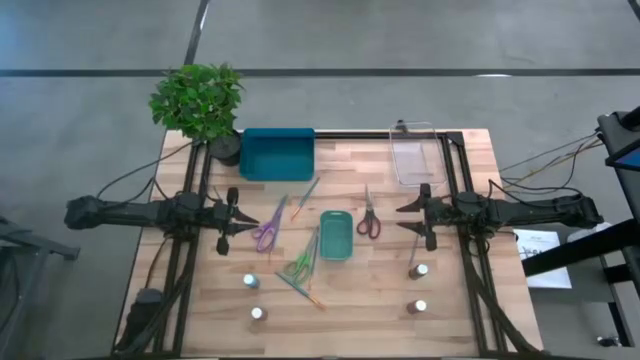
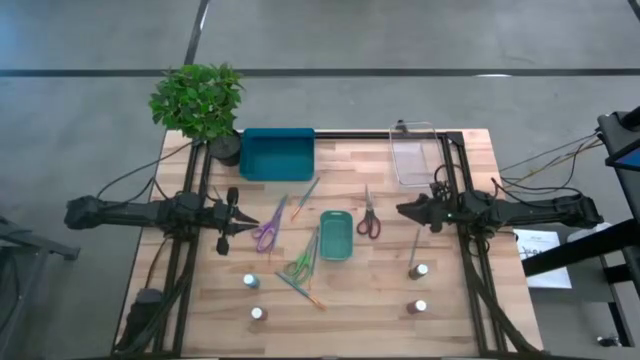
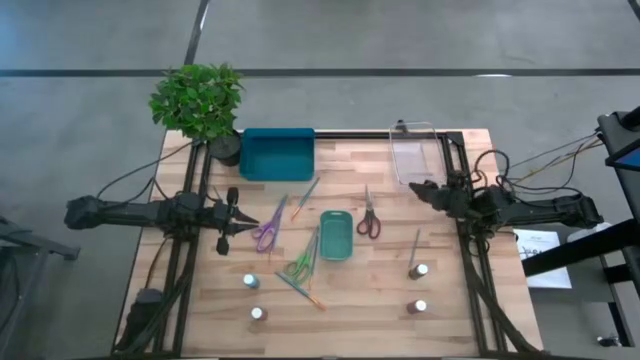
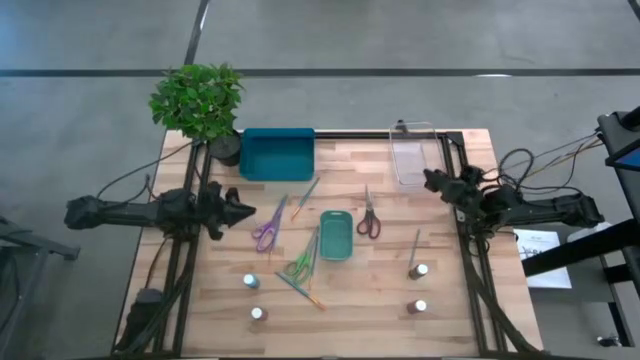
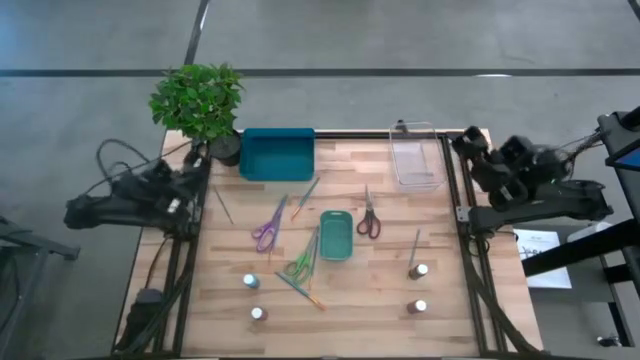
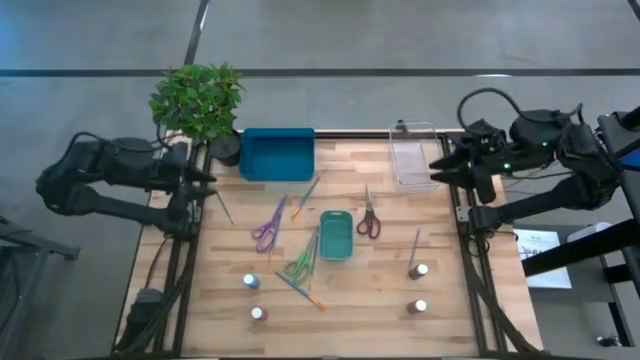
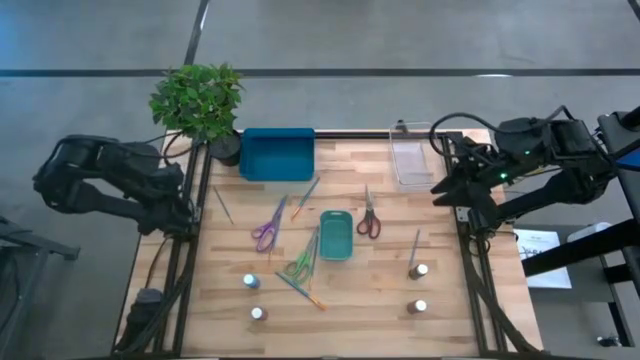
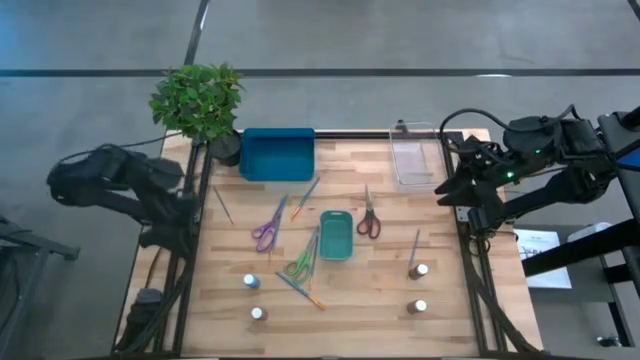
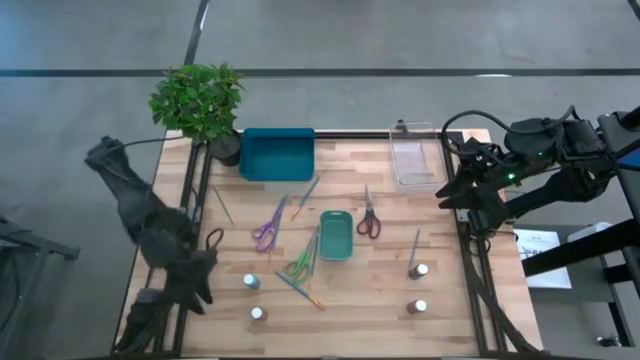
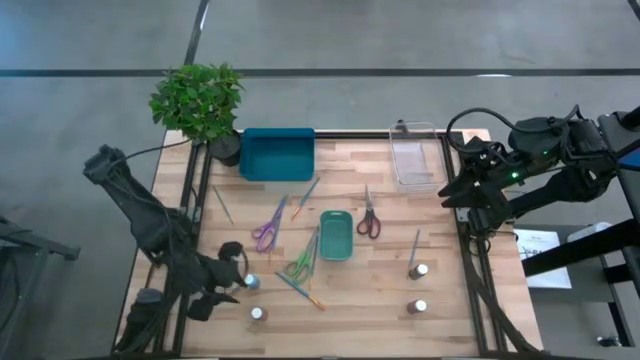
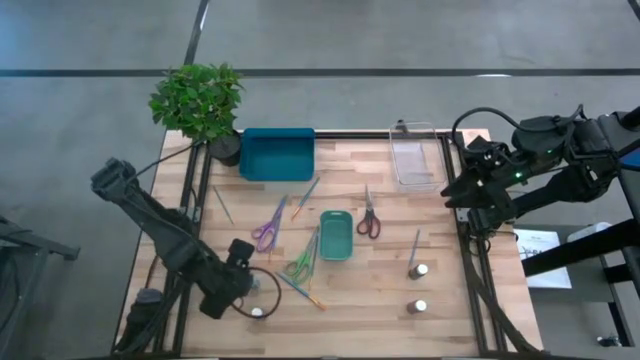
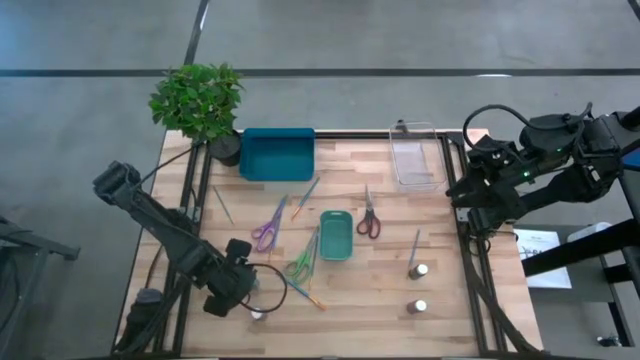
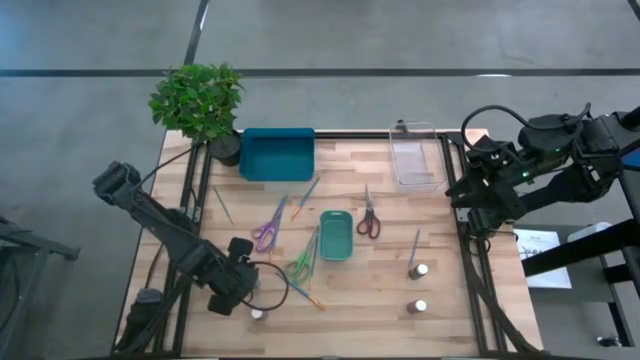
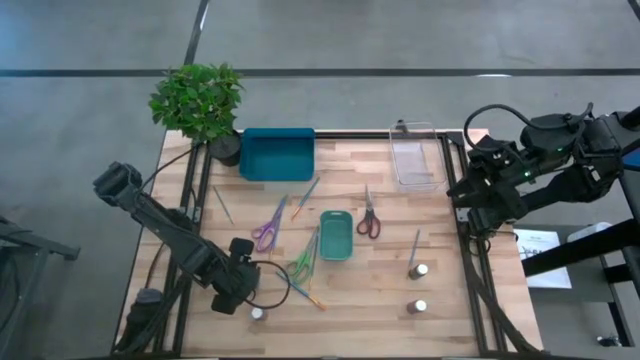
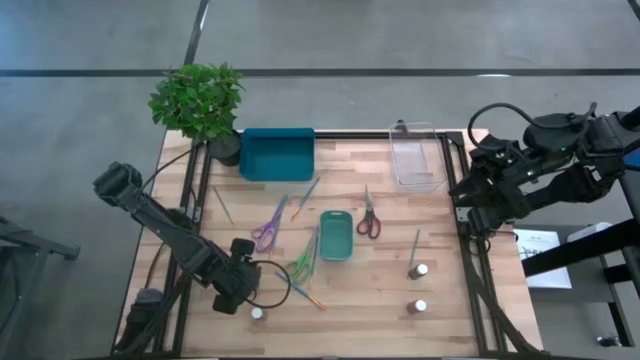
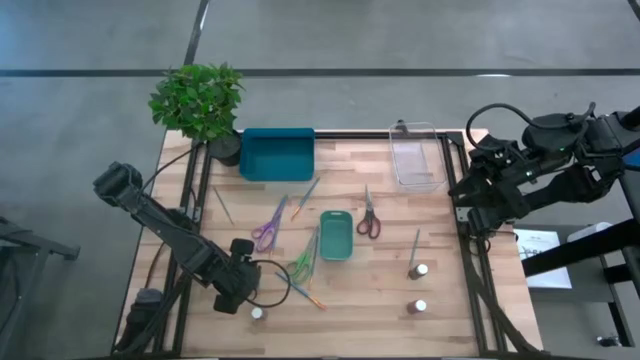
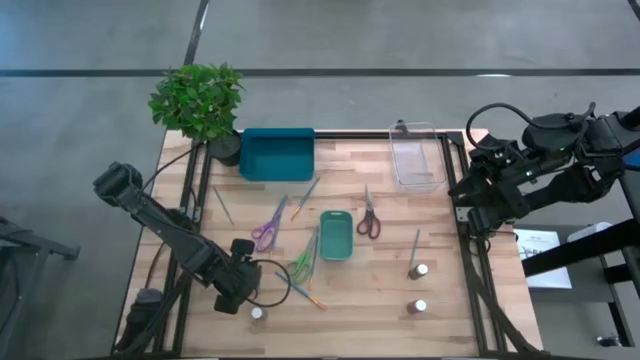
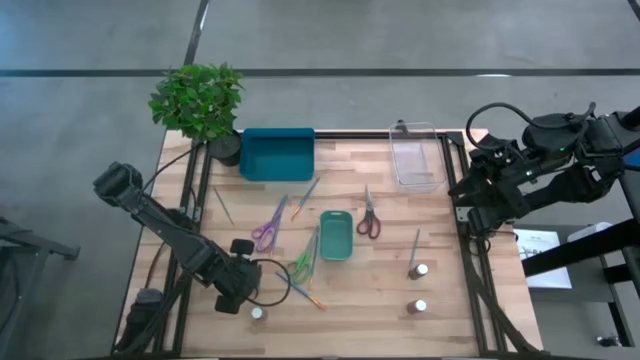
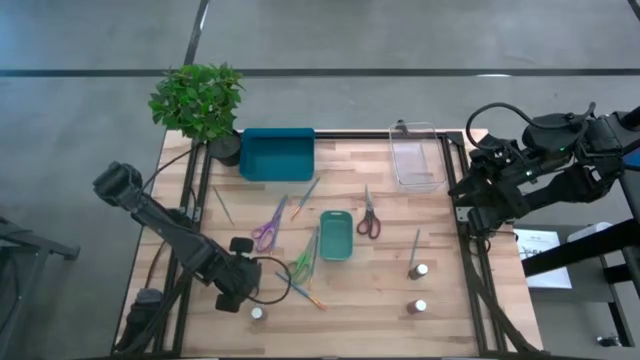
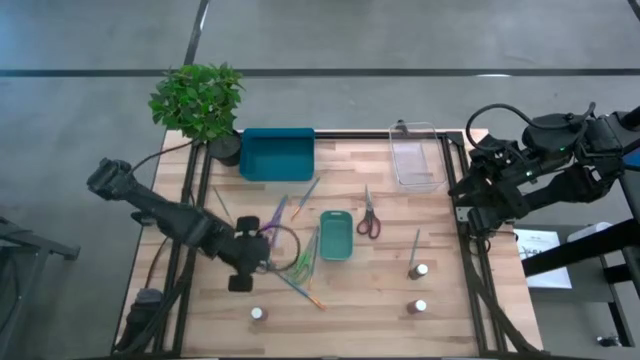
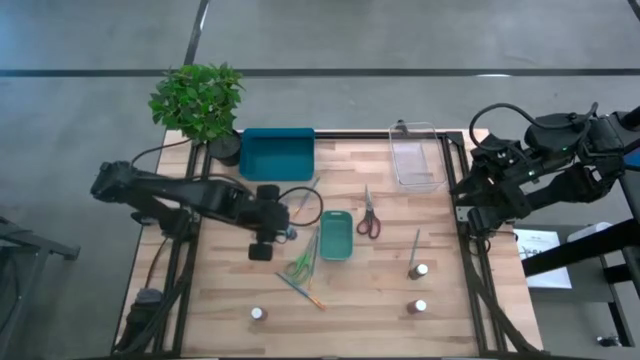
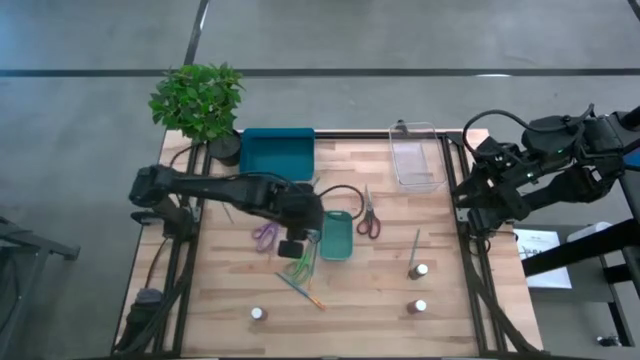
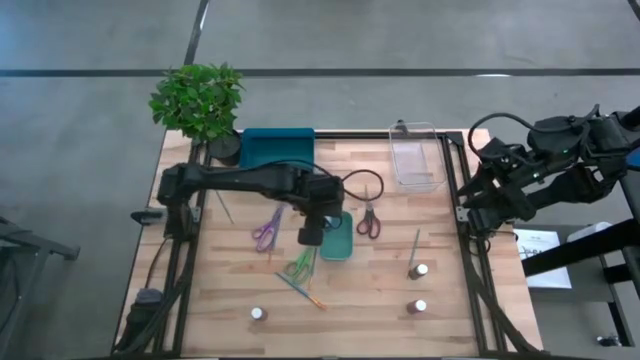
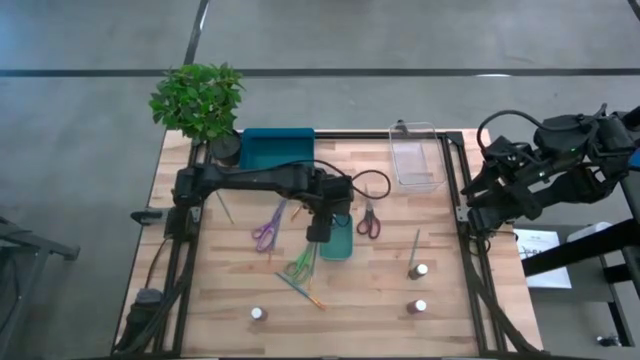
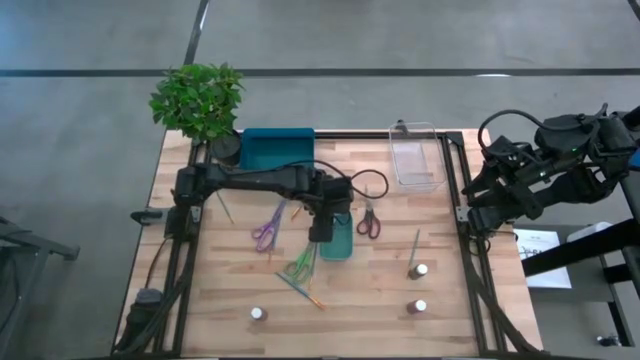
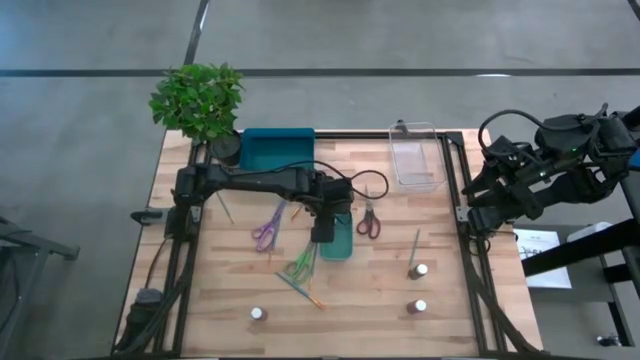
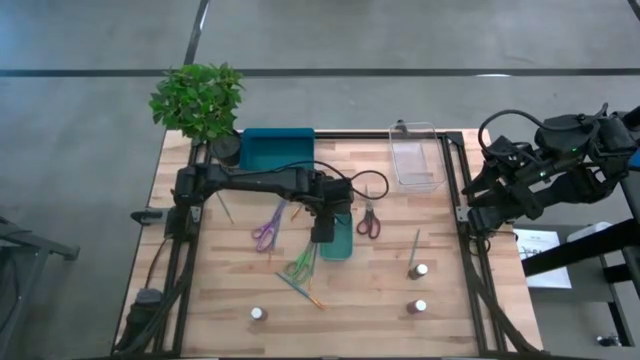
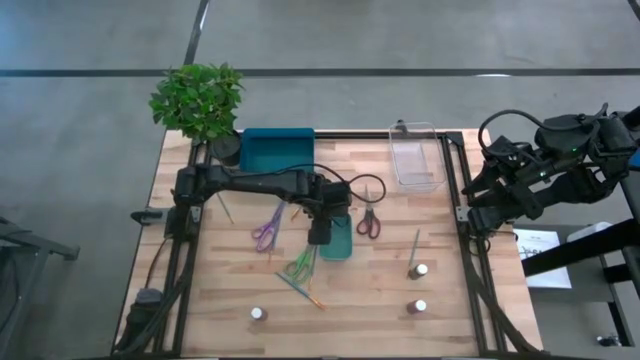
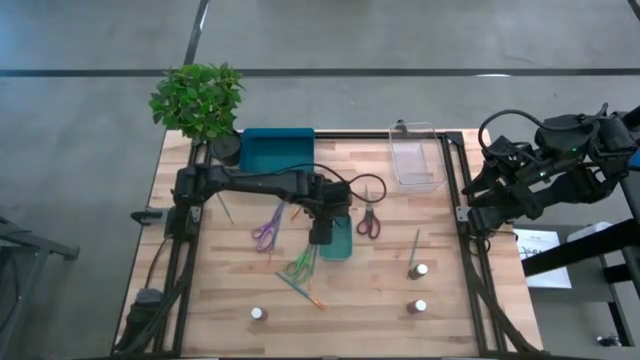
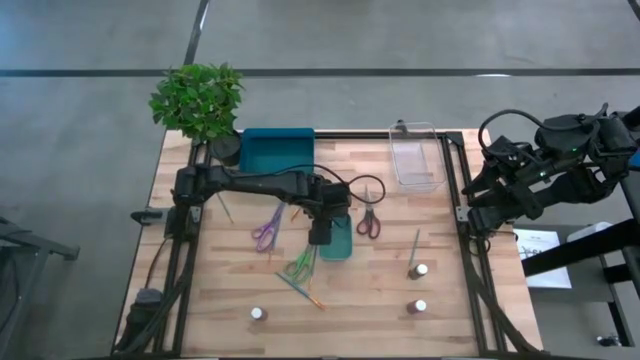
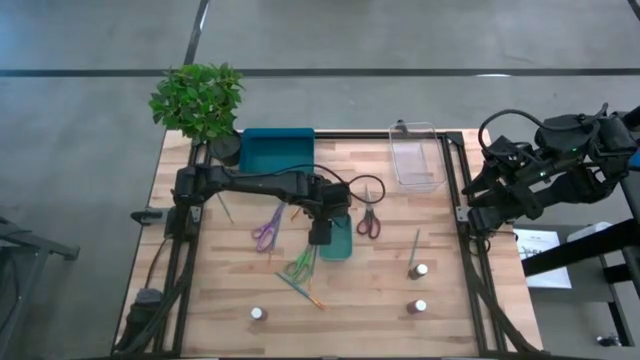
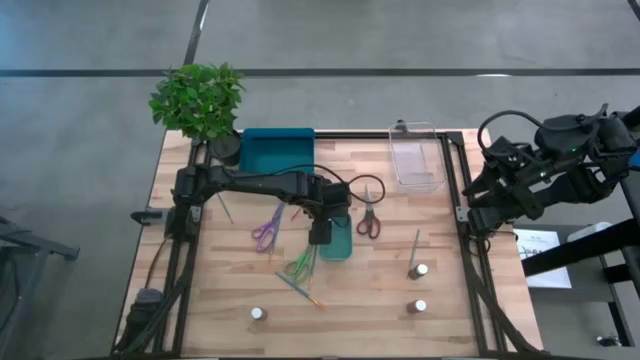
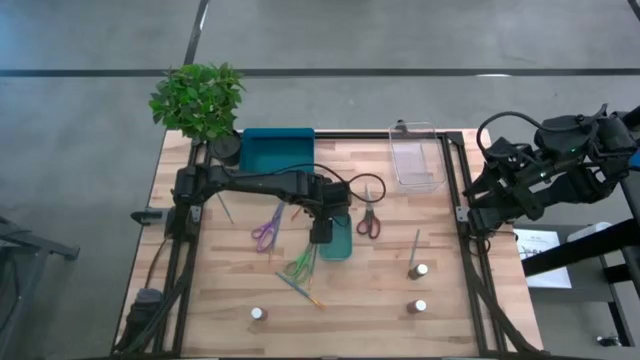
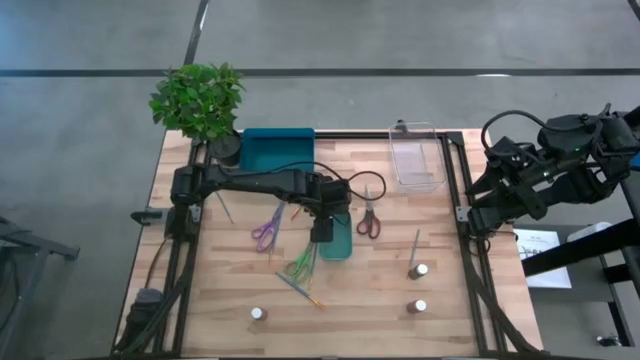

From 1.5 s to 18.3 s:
Task: Pick & Place Paint Supplies
Put the light blue paint bottle into the blue bin
